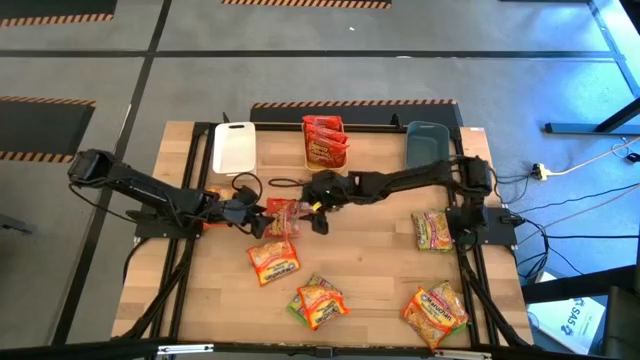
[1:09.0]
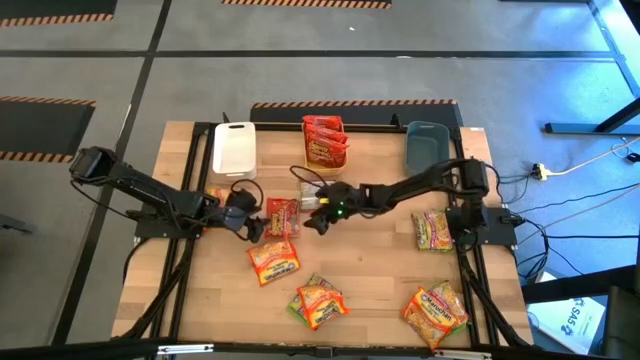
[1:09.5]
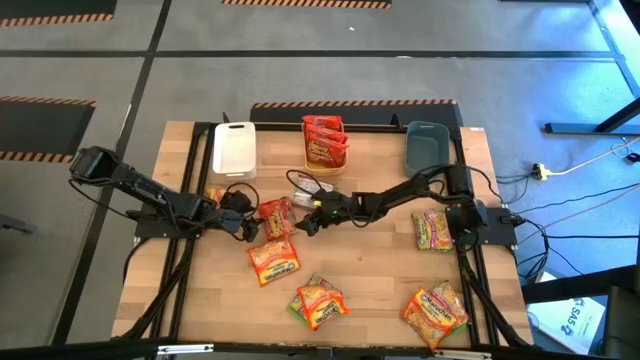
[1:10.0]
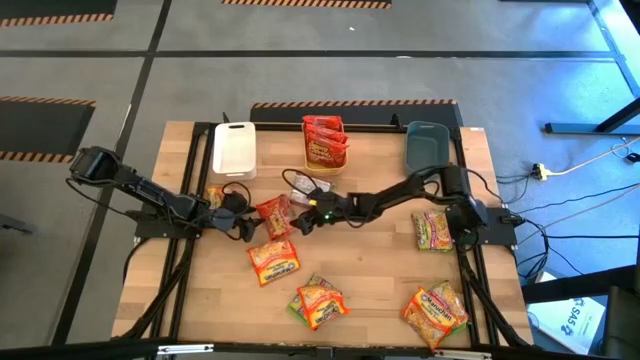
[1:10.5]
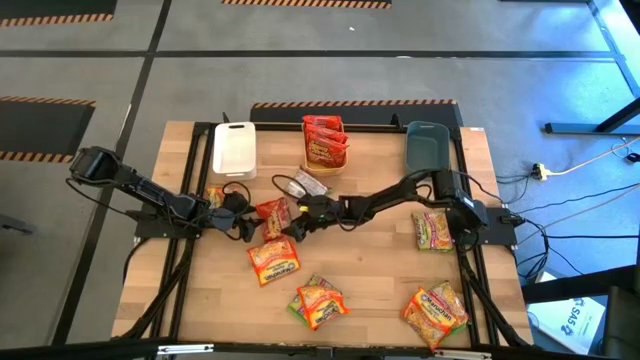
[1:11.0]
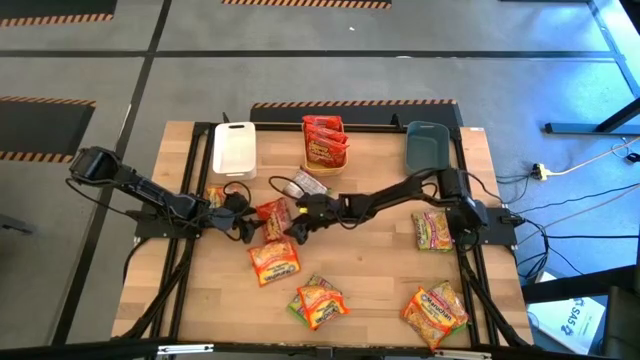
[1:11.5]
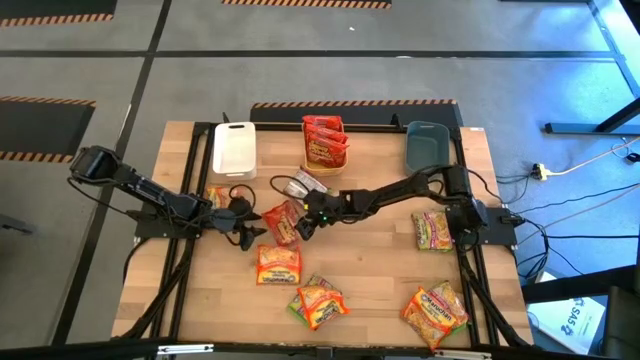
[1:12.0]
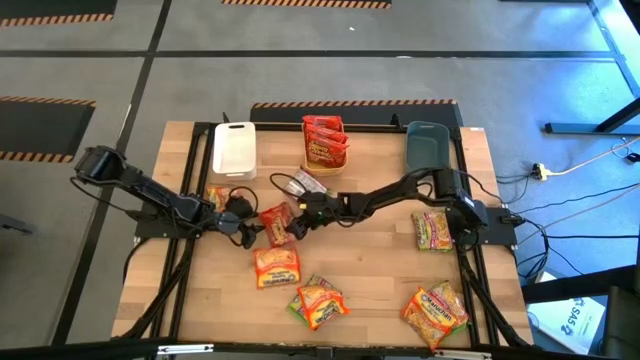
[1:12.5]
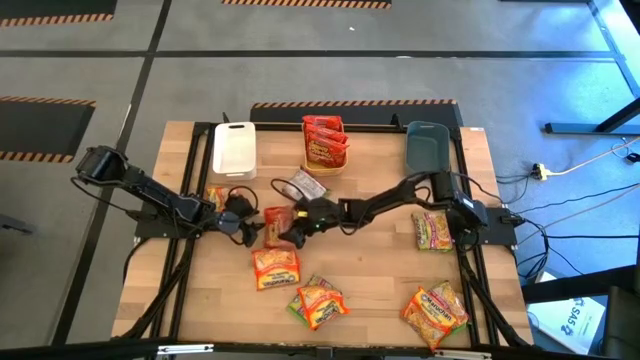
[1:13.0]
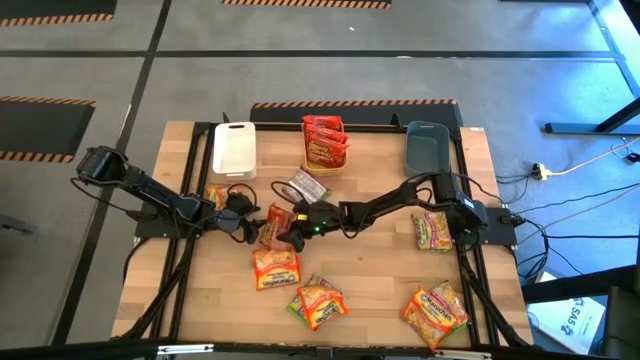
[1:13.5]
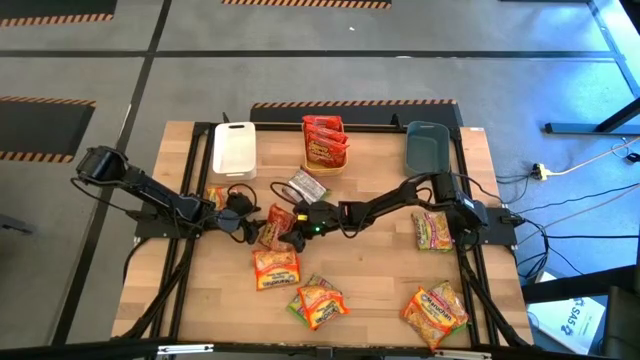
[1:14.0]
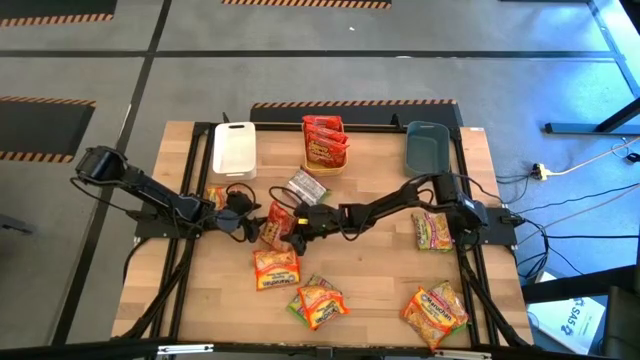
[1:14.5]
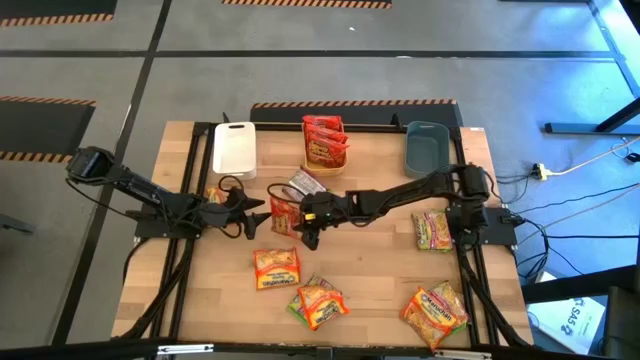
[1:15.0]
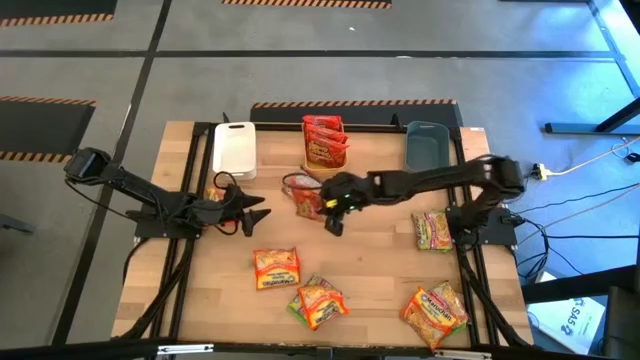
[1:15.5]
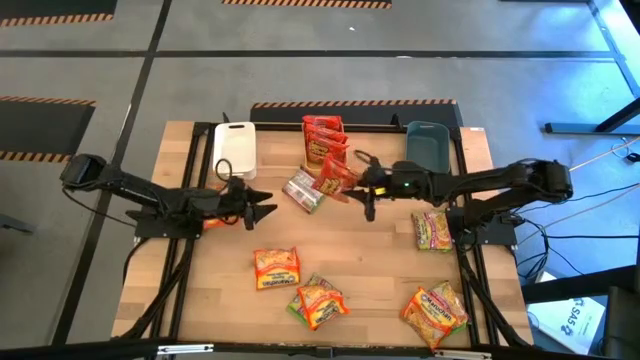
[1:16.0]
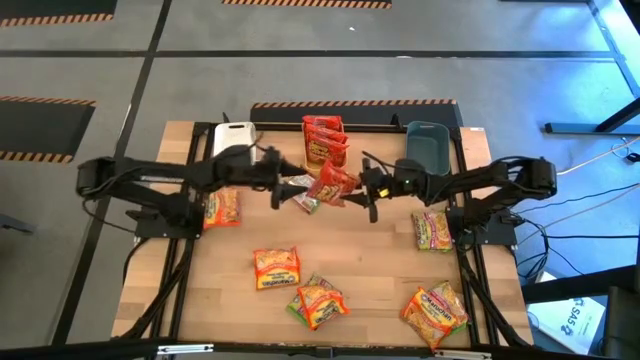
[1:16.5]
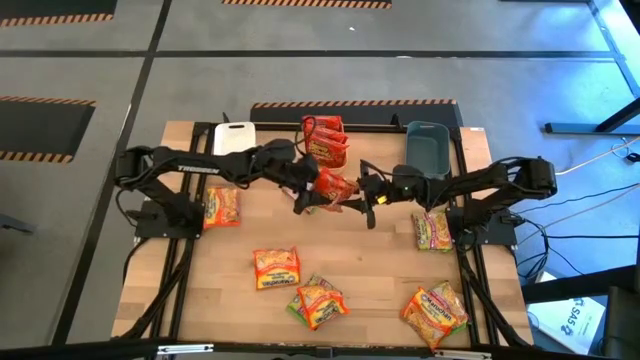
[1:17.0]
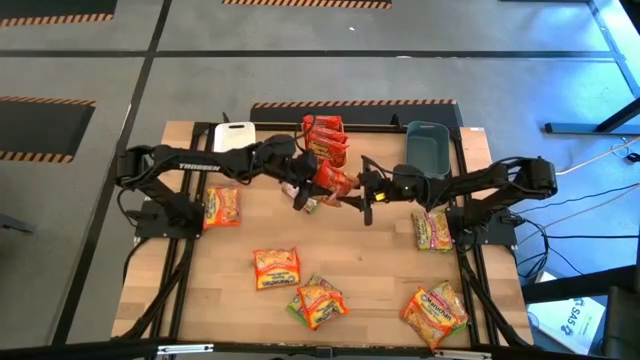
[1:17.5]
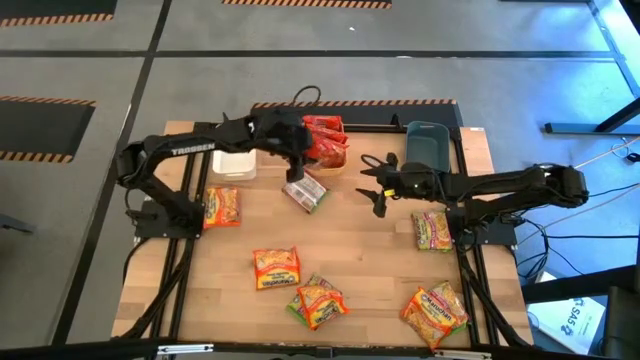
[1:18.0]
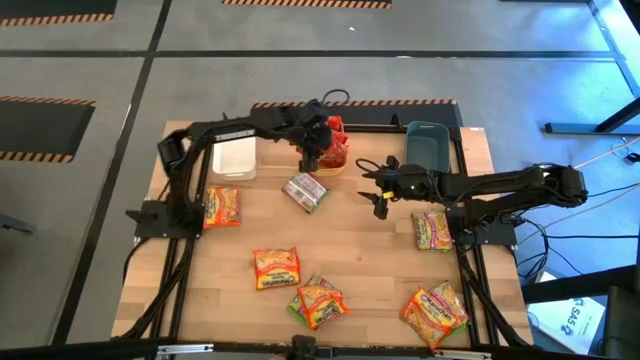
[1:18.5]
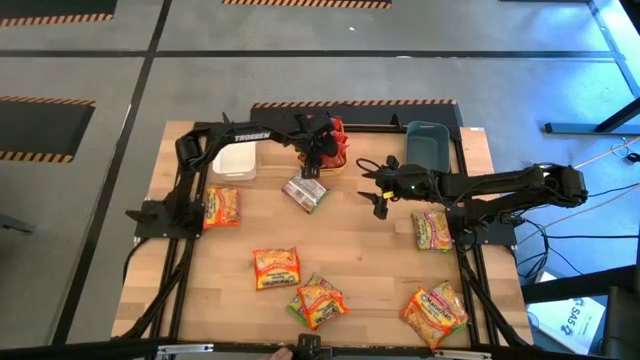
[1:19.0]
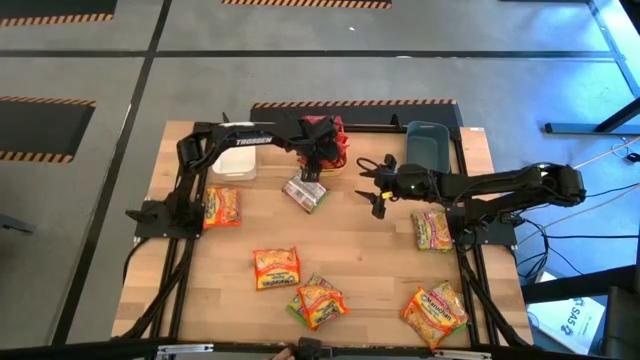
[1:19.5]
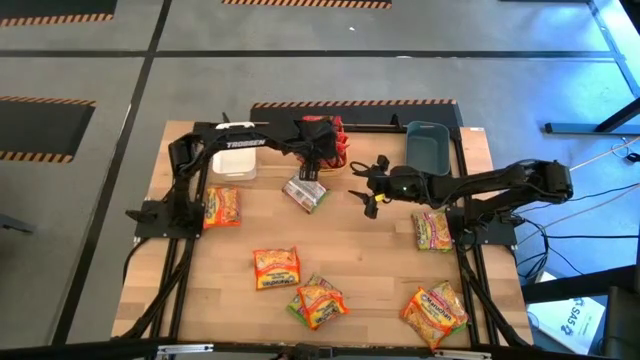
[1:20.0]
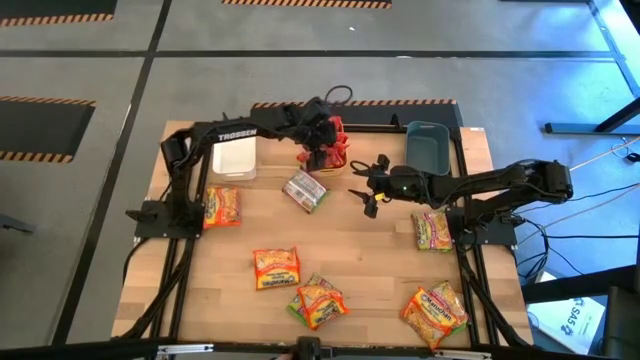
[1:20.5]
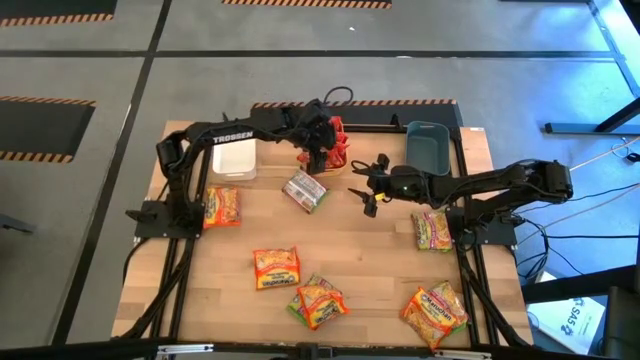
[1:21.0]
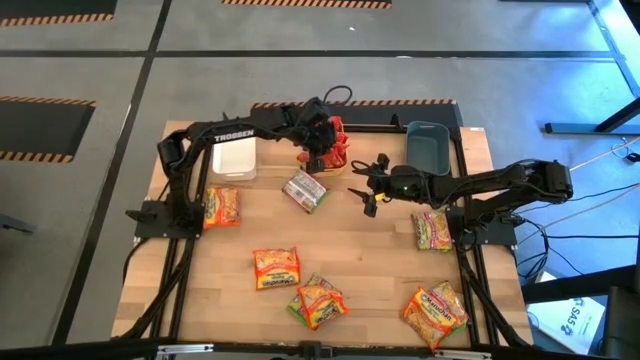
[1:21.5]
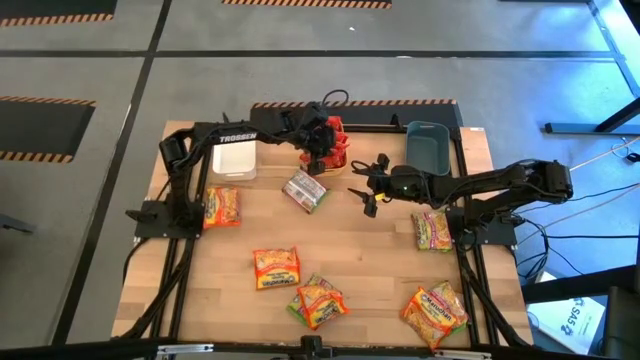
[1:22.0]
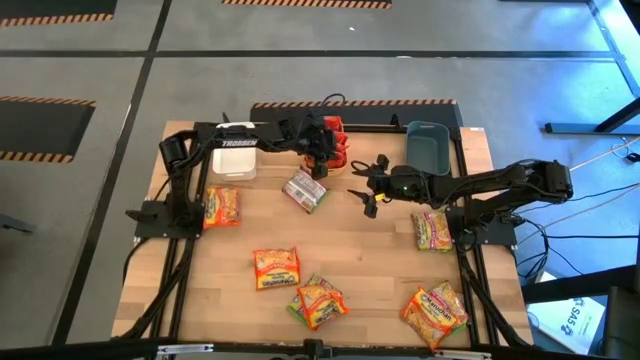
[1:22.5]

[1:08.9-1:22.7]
Task: Sort Maruchan noodles
Put the orange noodle pack into the yellow bin

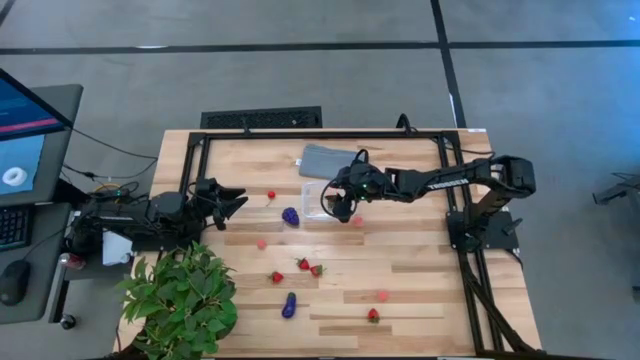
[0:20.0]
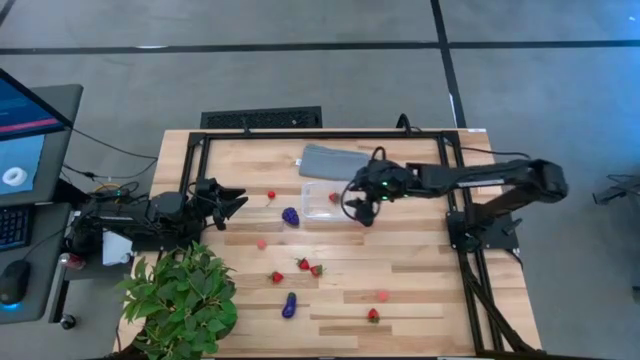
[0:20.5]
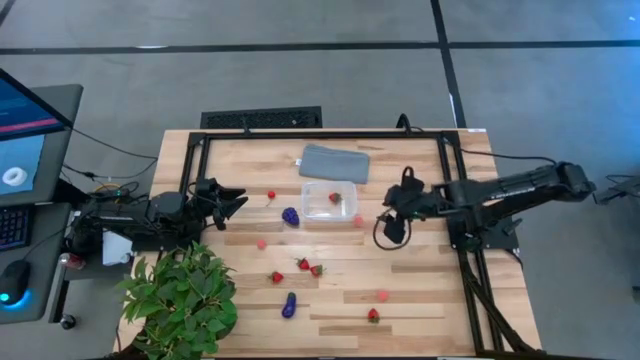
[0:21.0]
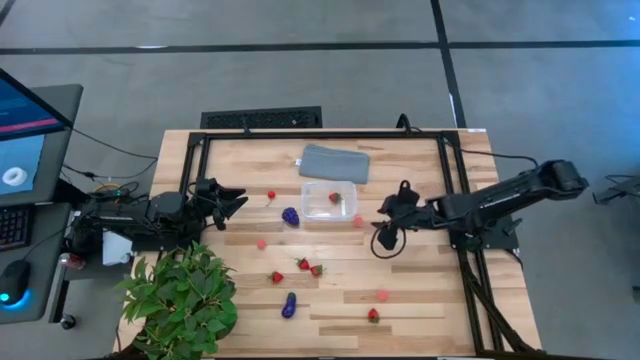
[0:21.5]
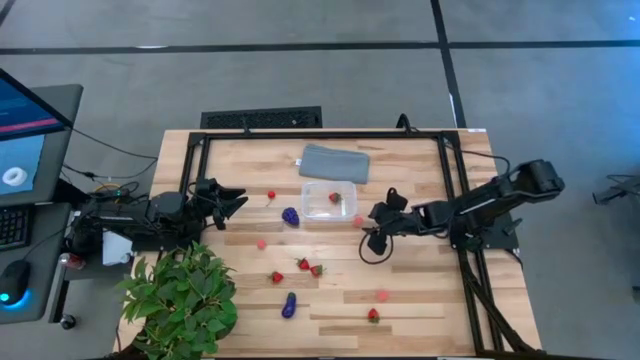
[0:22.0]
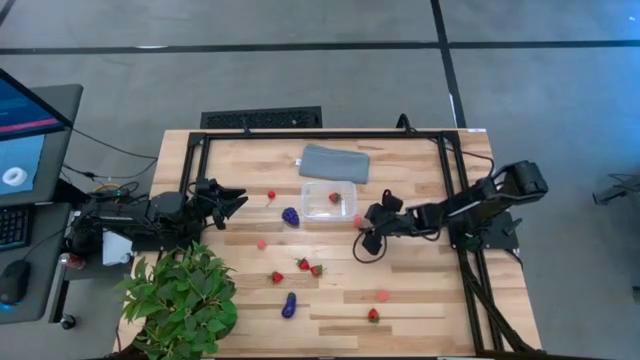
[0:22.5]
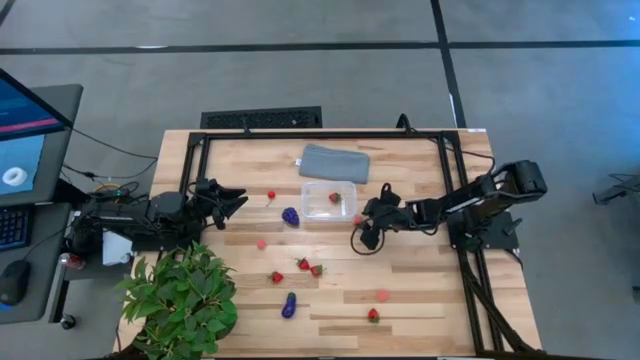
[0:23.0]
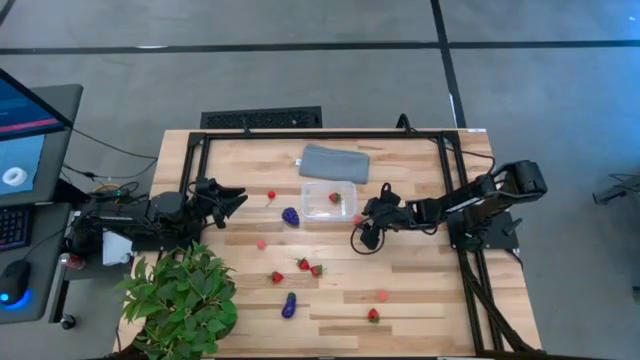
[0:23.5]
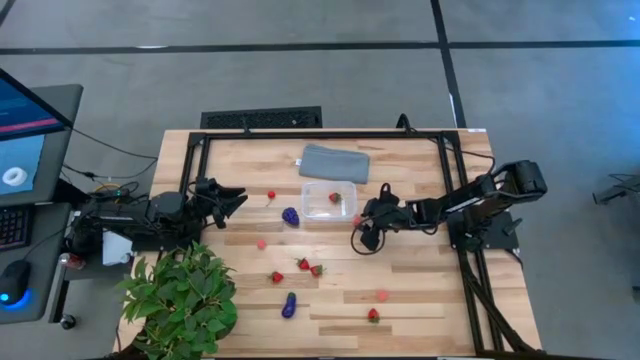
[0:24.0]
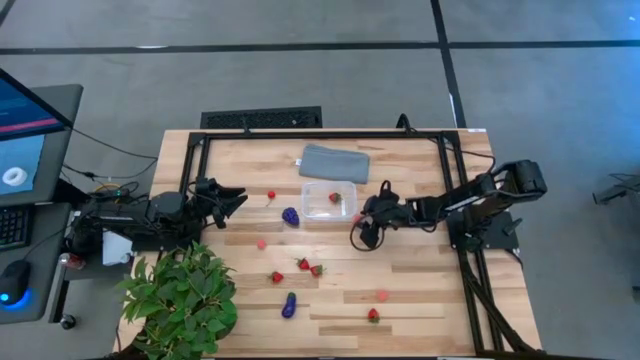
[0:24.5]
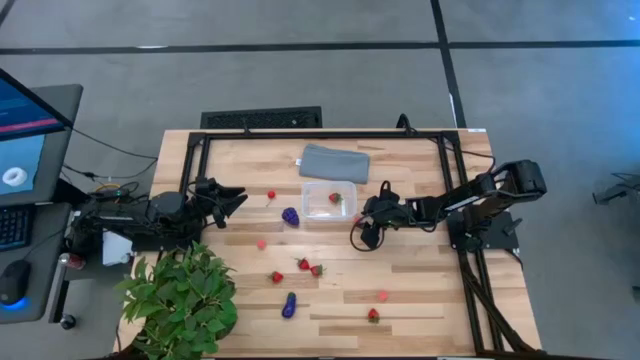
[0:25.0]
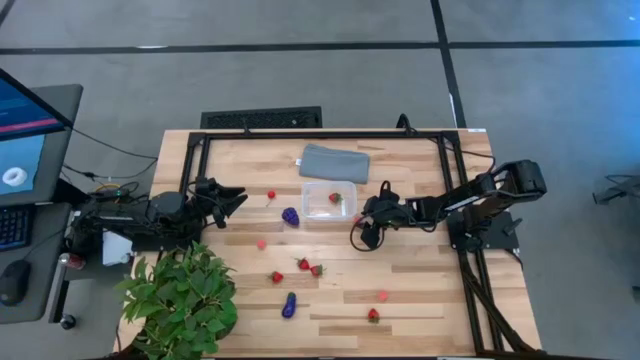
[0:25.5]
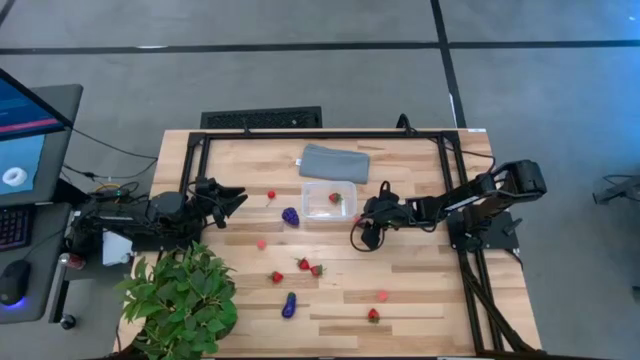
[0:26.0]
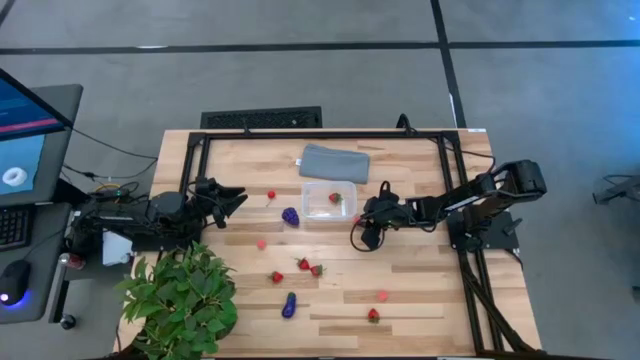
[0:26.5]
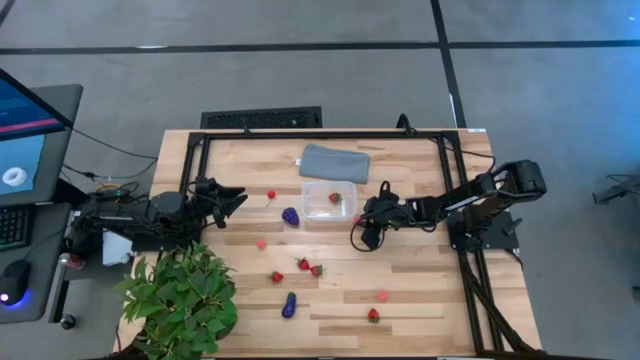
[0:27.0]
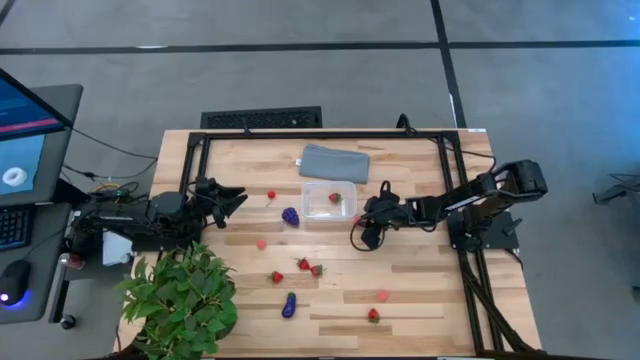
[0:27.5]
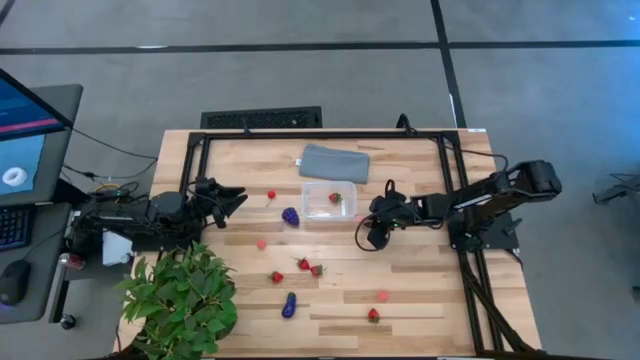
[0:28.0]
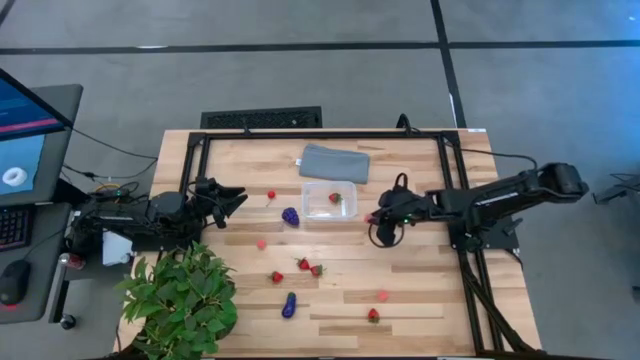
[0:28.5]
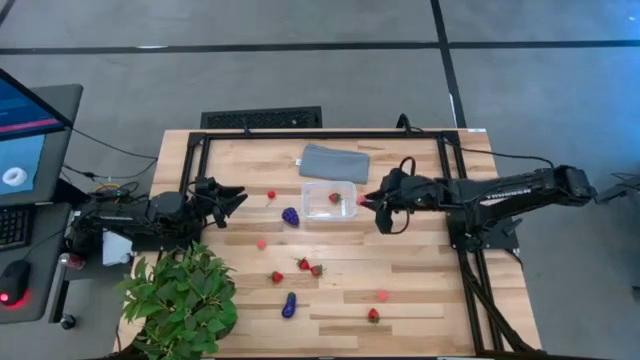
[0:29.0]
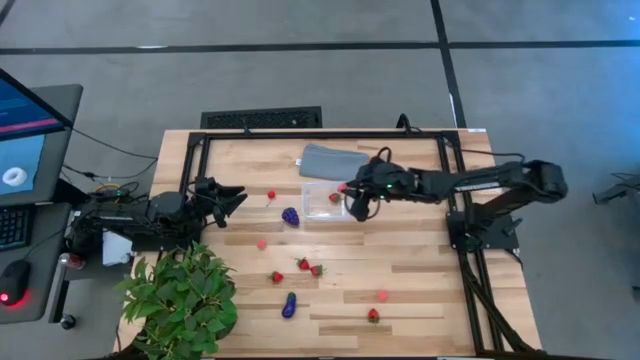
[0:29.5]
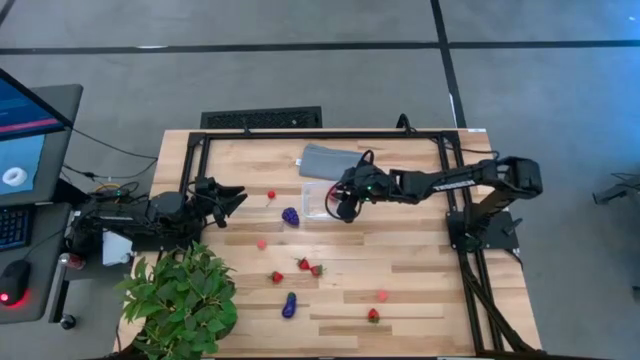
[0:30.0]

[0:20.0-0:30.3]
Task: Pick and placing Produce into tupperware
Put the pink peach into the transparent bin
